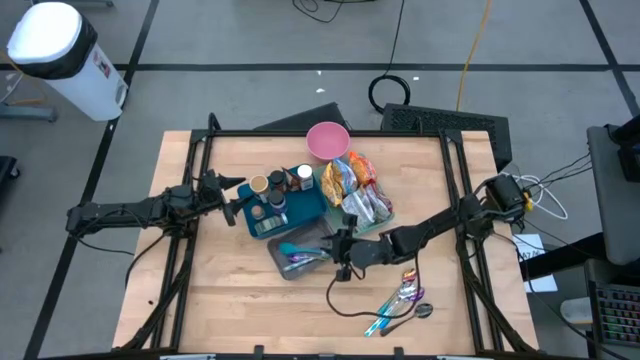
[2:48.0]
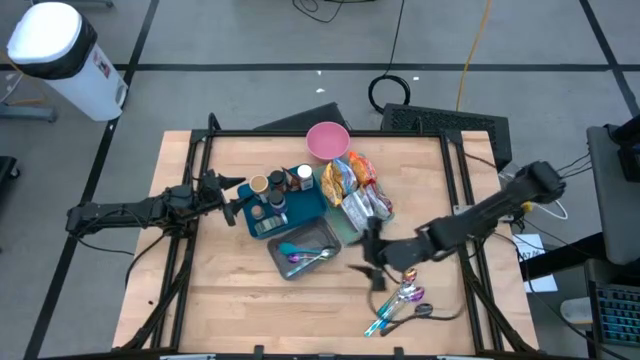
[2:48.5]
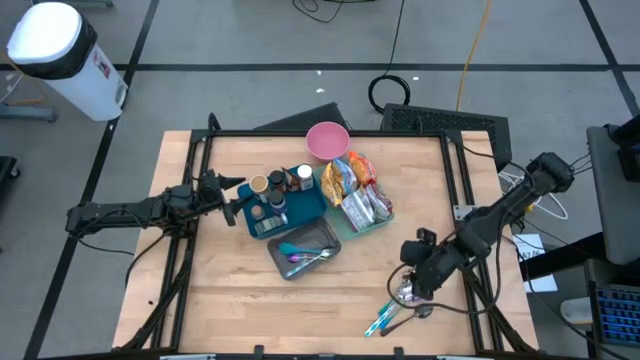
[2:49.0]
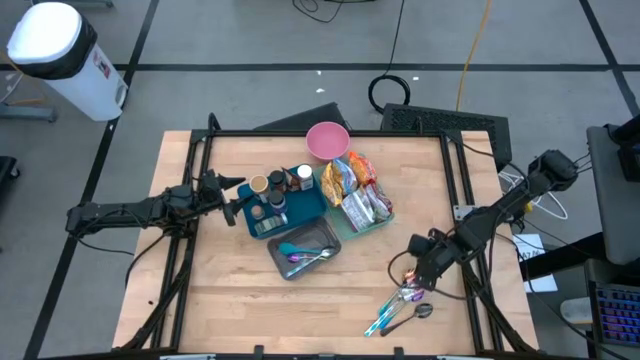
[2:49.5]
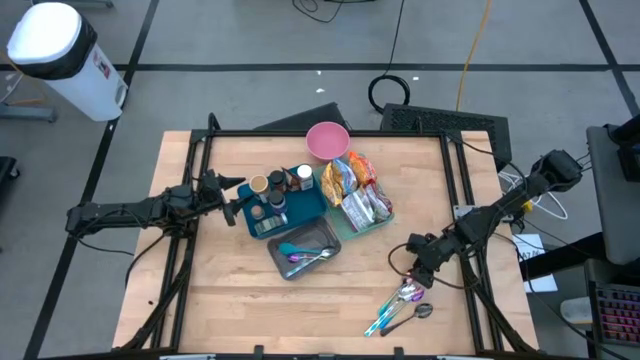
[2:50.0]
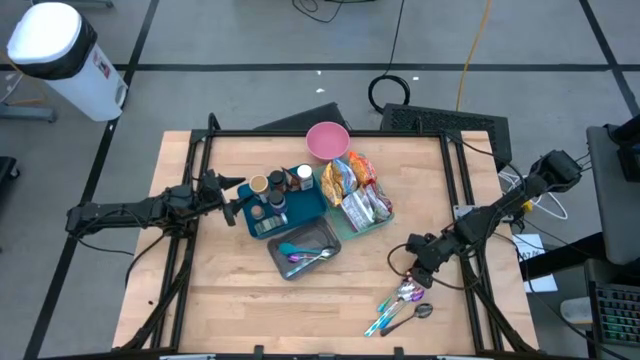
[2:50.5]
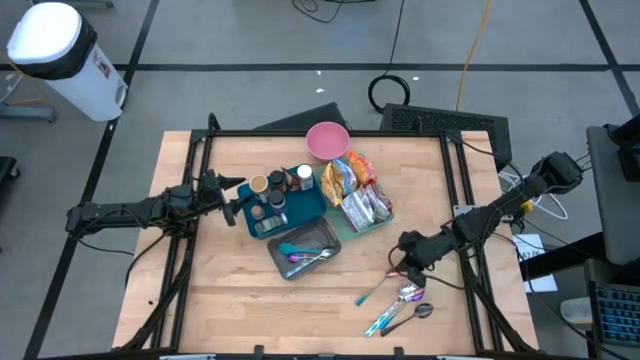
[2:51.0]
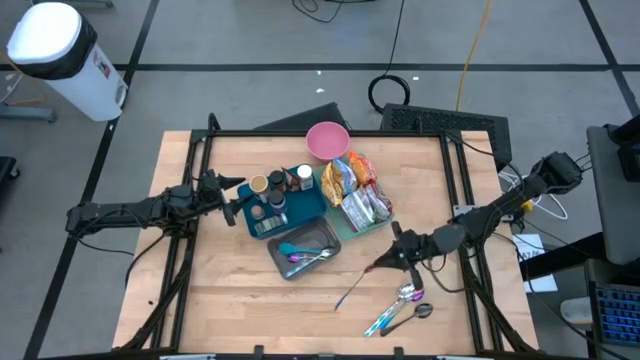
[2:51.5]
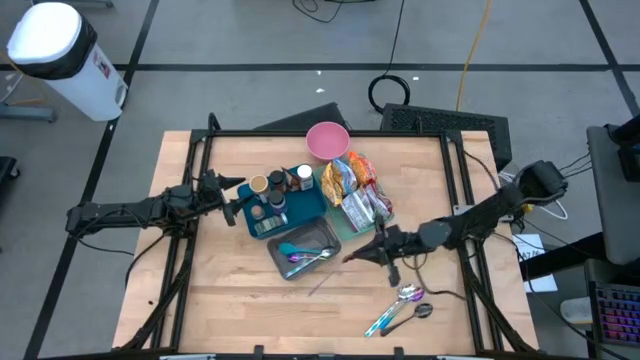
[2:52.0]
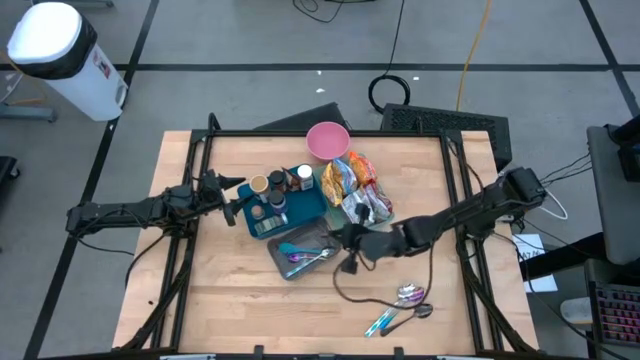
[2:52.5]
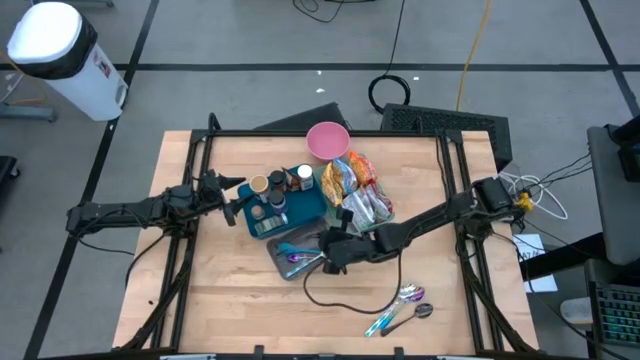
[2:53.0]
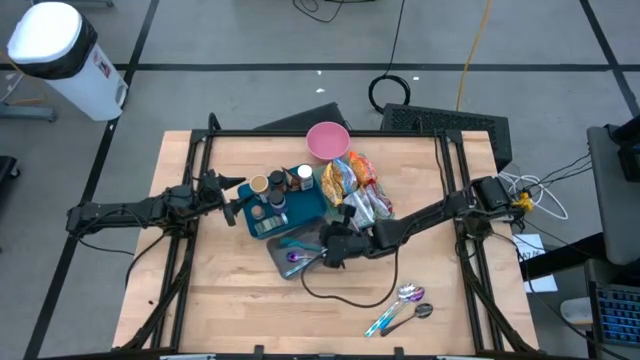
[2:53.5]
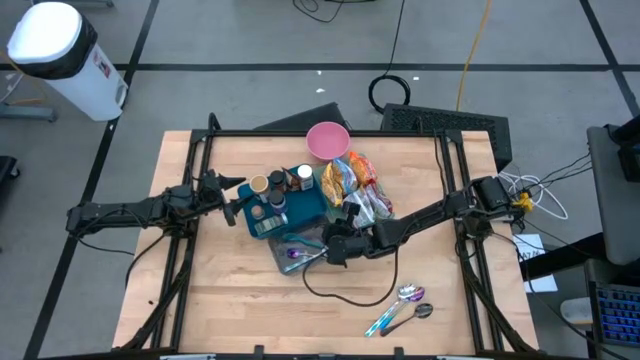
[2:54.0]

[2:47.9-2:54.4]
Task: Pick & Place Food Item
Put the top blue spoon into the black bin

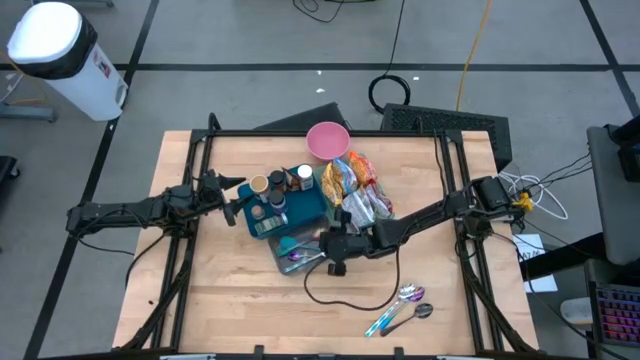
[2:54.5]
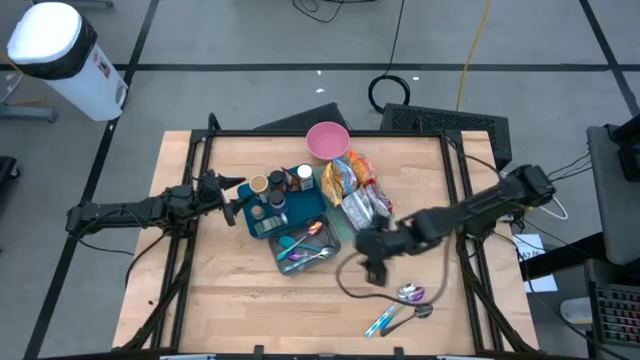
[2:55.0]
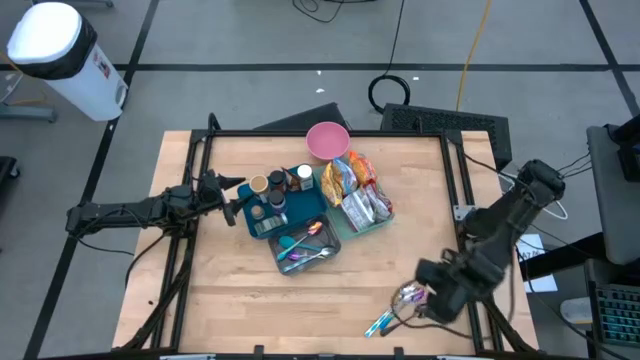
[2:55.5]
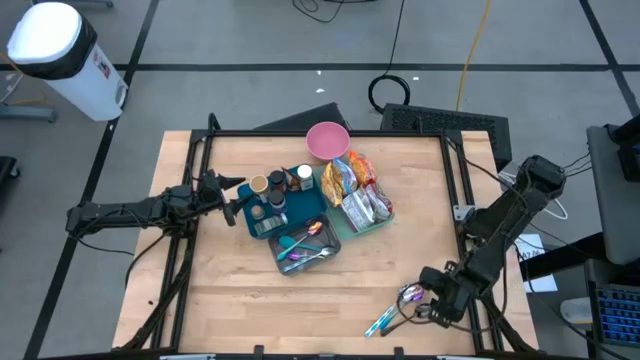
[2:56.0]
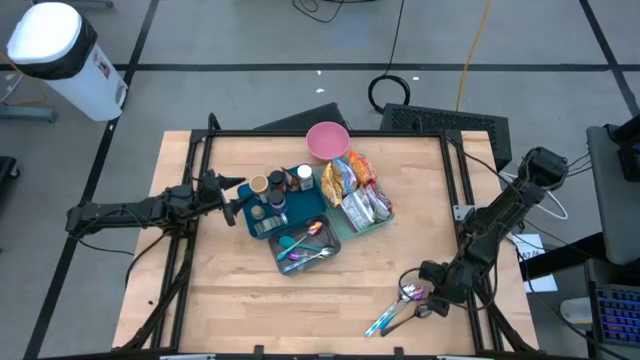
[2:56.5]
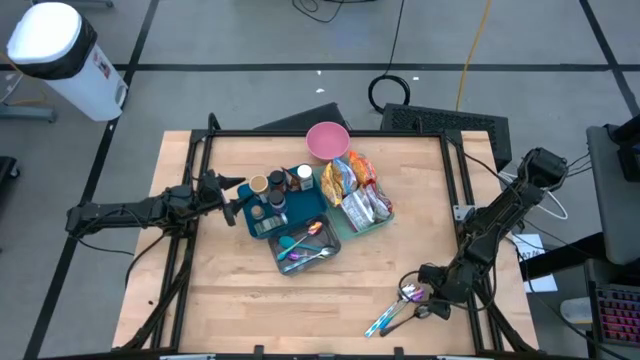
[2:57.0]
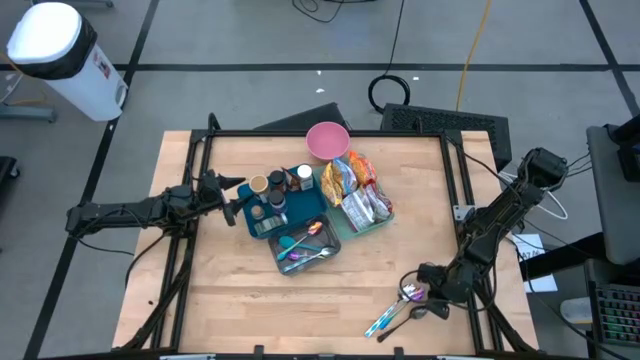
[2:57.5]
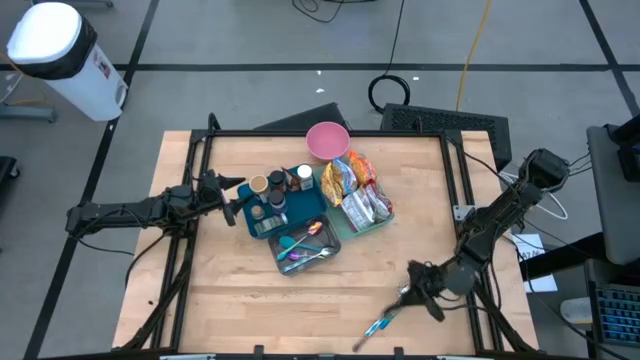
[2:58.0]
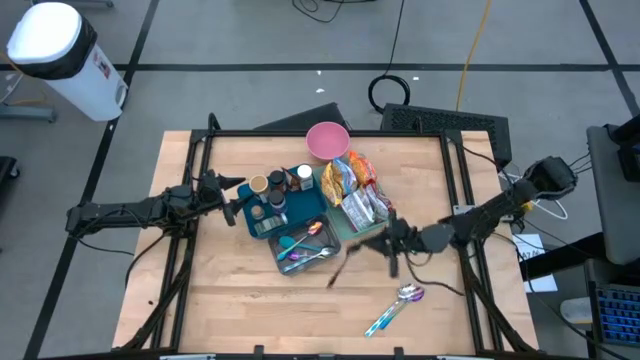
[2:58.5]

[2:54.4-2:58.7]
Put the black spoon into the black bin

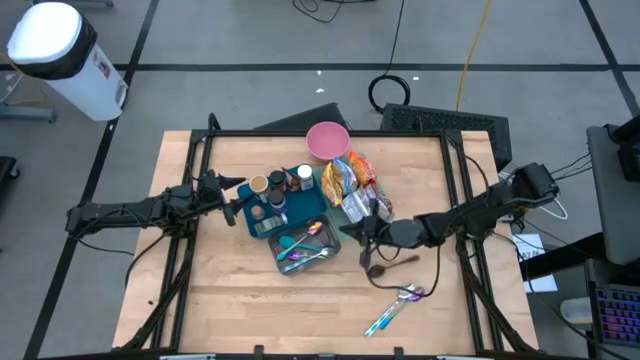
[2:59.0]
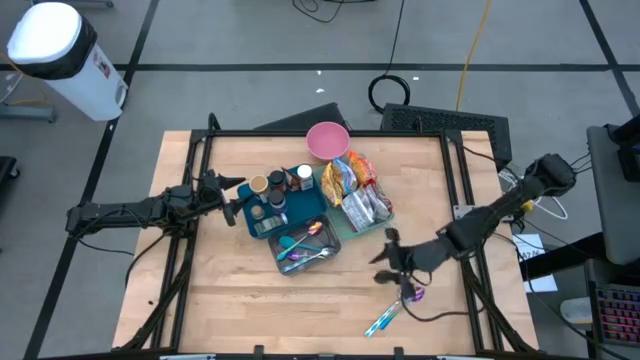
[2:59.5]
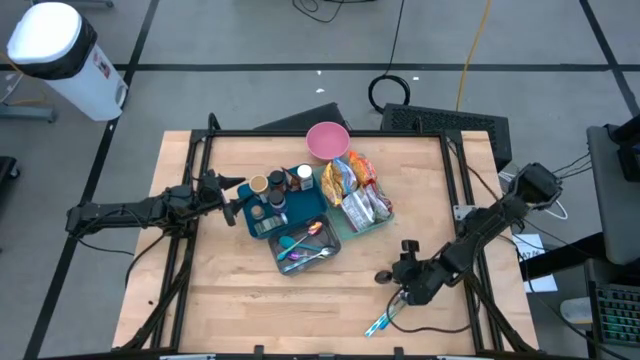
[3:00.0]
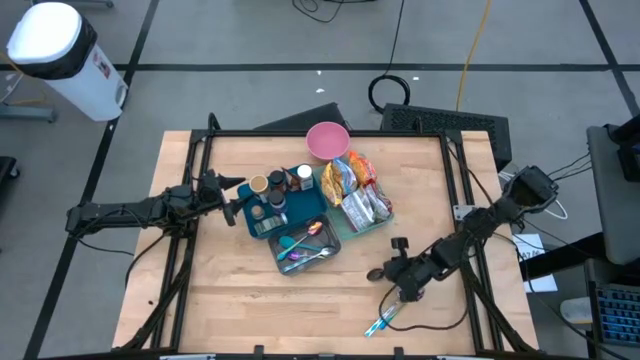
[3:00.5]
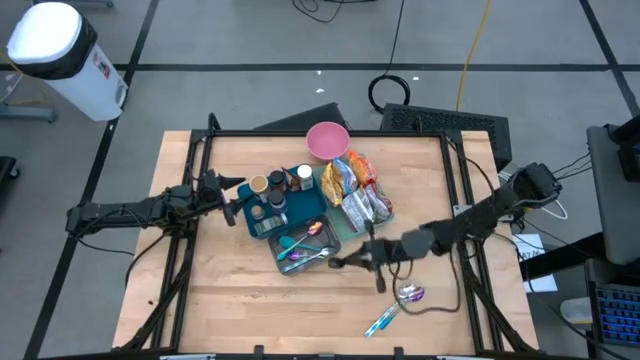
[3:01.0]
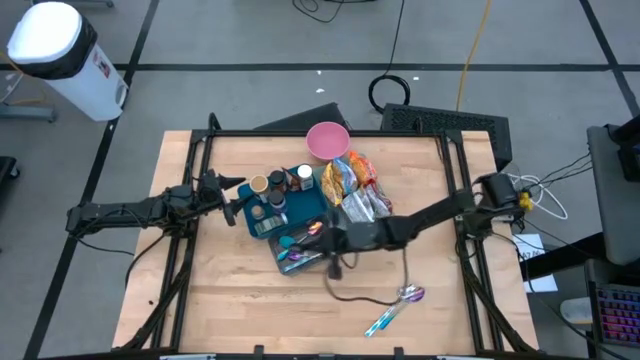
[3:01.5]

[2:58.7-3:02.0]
Put the black spoon into the black bin

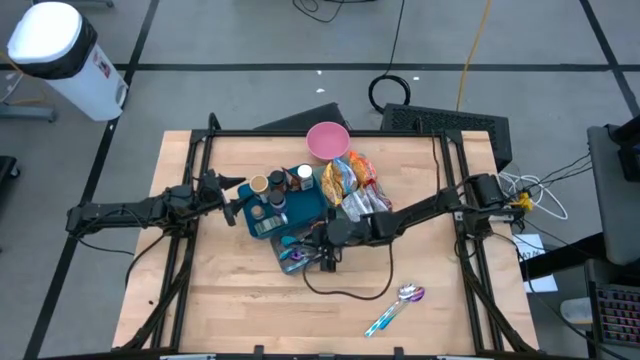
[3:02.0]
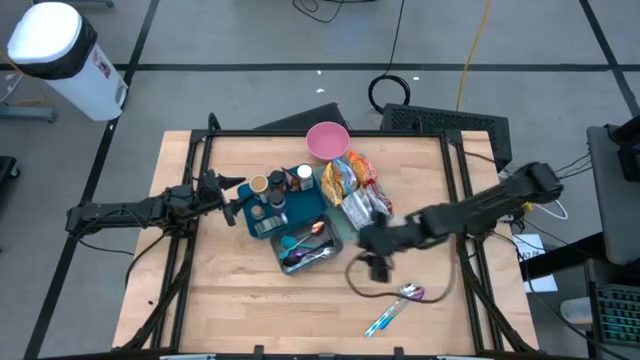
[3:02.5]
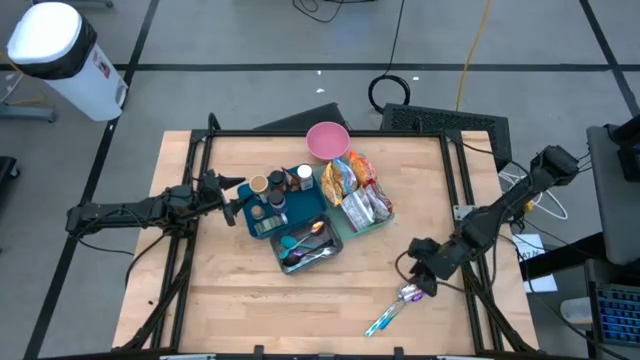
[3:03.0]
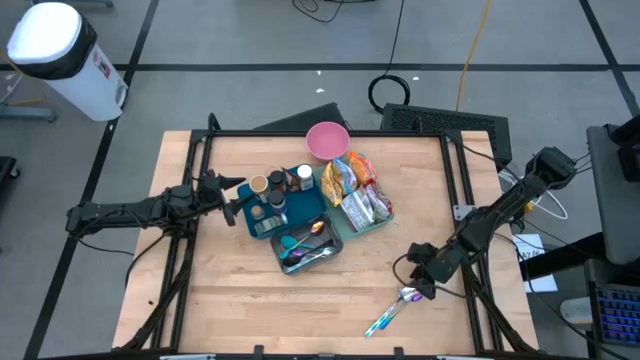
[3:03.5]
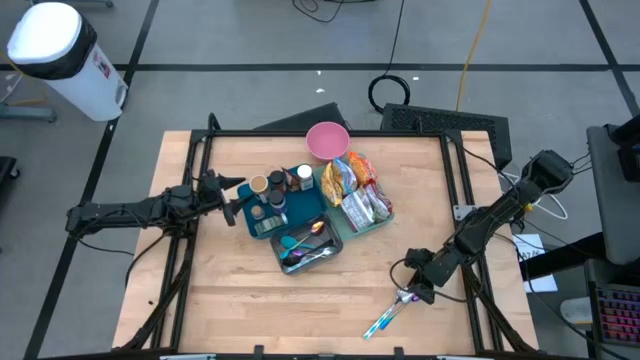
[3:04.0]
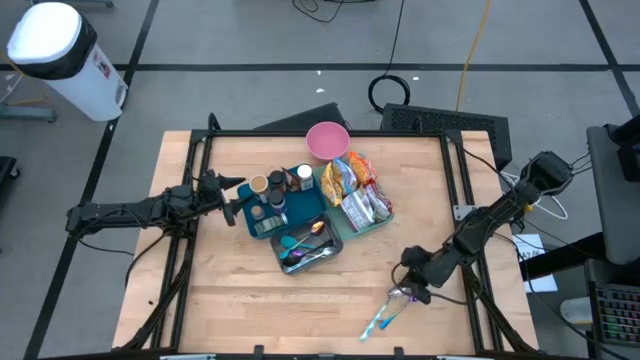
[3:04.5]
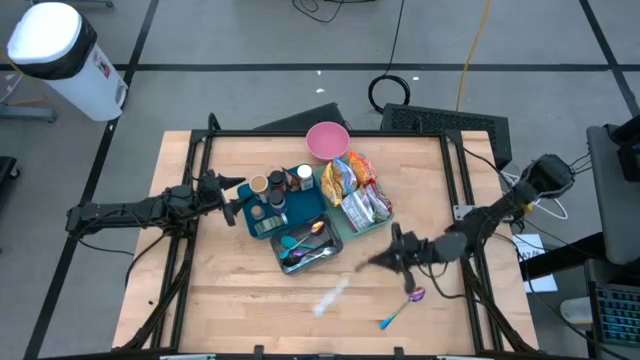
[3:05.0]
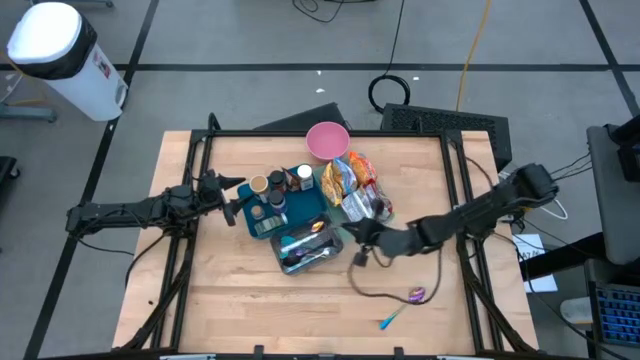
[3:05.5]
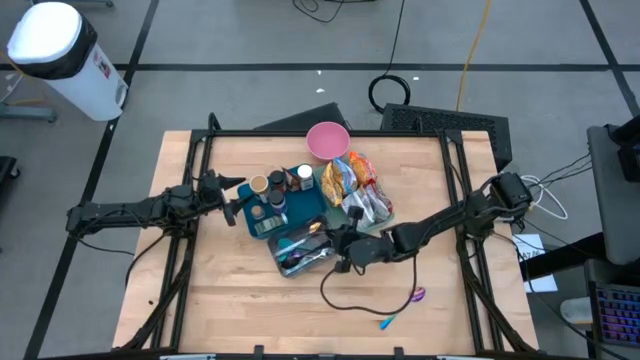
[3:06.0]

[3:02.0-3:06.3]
Put the white spoon into the black bin

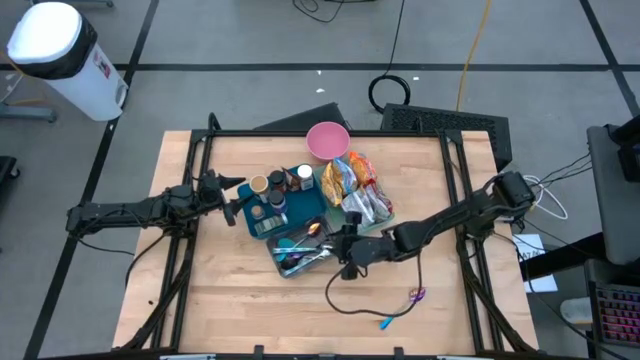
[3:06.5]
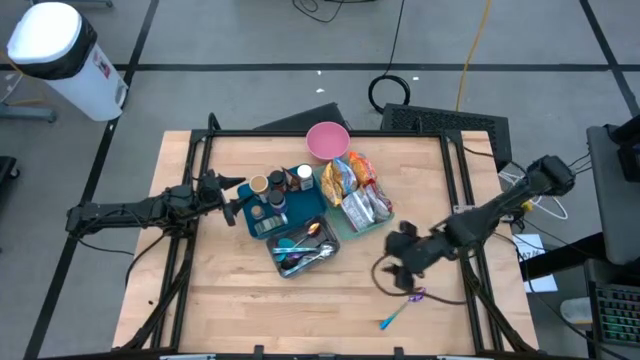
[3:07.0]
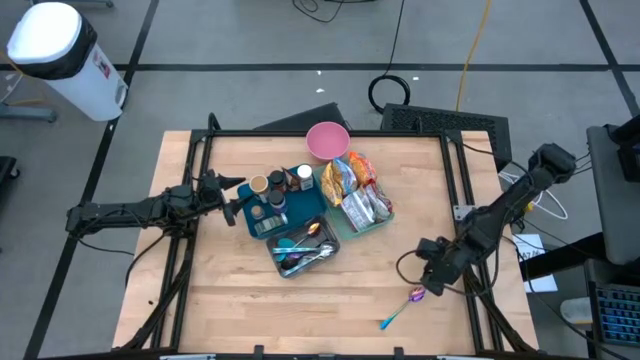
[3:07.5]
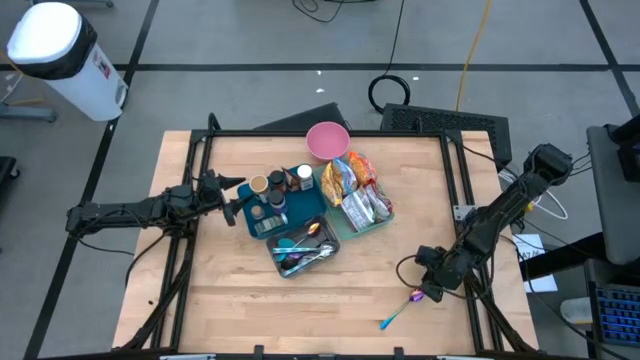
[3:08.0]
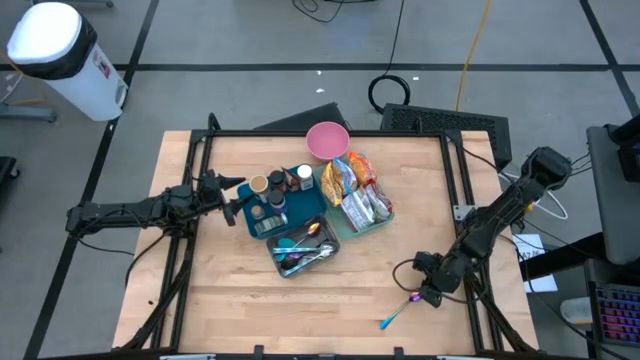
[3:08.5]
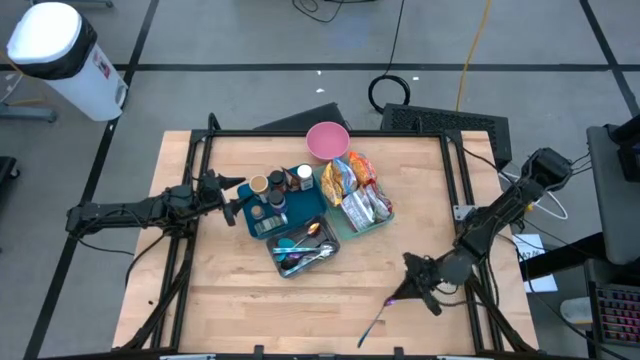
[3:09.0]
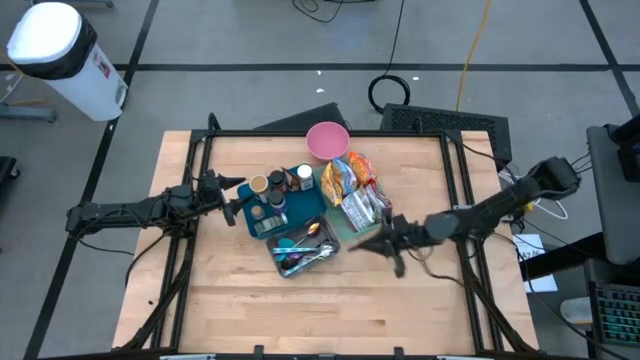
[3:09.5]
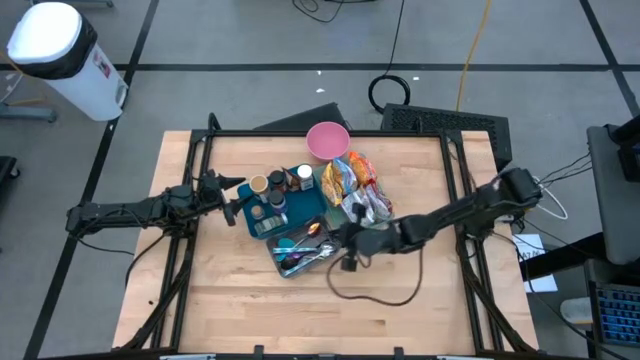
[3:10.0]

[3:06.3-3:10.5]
Put the blue spoon into the black bin
